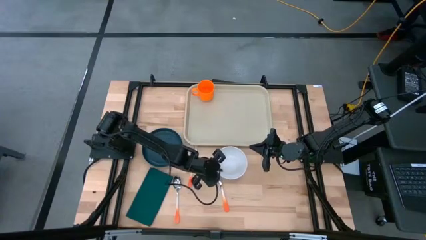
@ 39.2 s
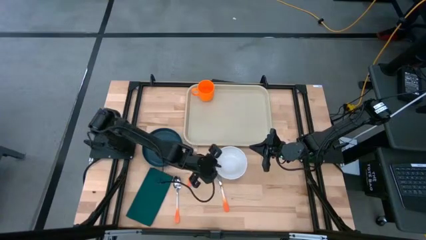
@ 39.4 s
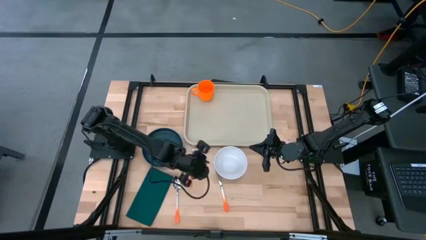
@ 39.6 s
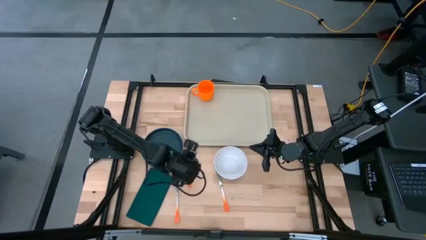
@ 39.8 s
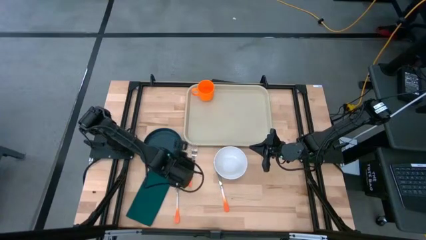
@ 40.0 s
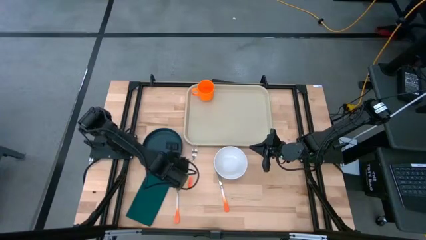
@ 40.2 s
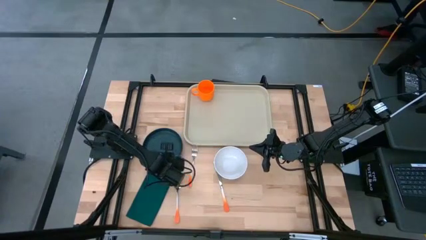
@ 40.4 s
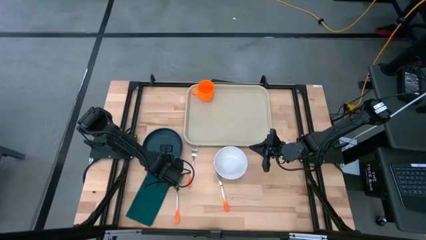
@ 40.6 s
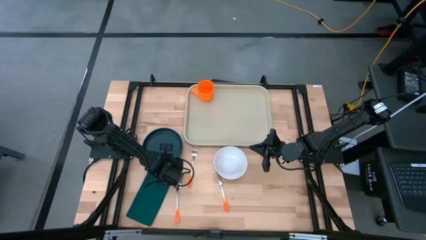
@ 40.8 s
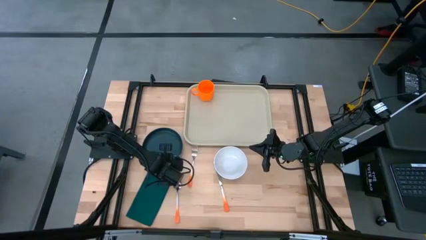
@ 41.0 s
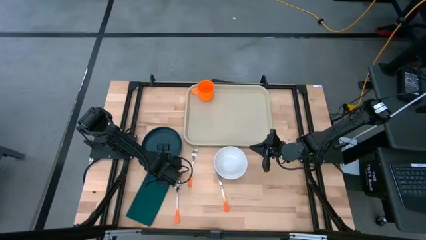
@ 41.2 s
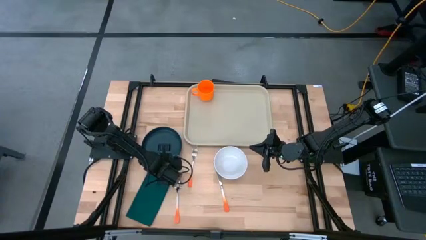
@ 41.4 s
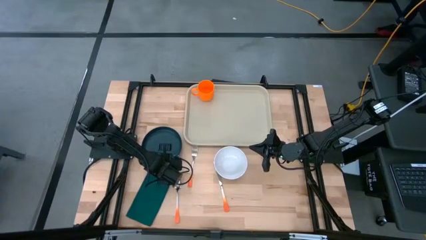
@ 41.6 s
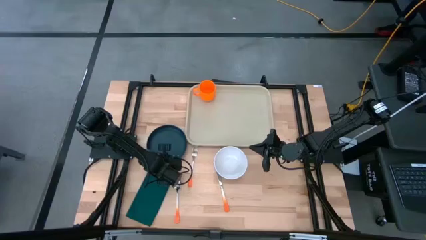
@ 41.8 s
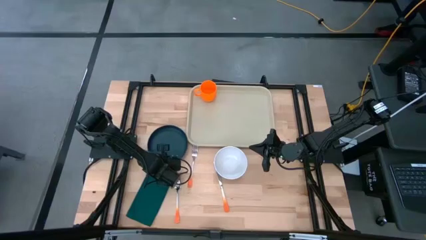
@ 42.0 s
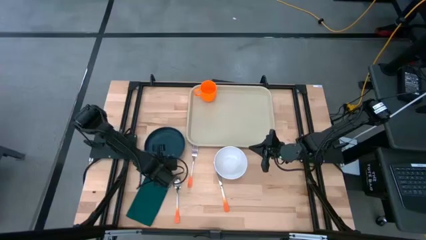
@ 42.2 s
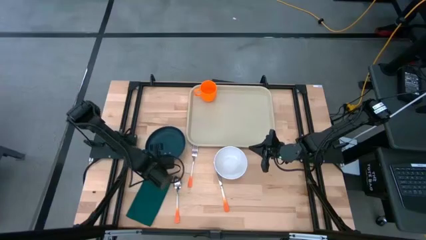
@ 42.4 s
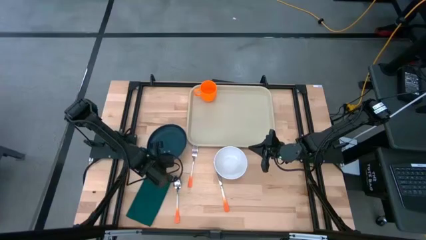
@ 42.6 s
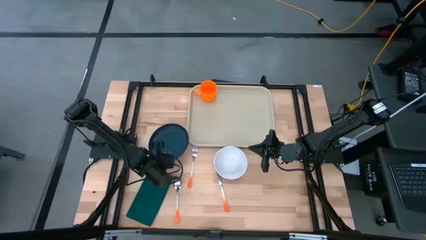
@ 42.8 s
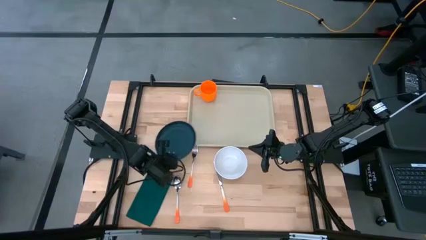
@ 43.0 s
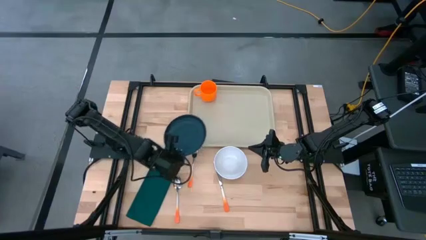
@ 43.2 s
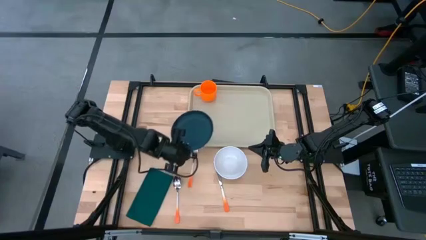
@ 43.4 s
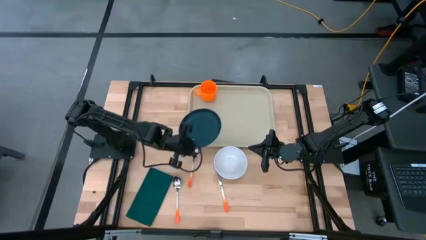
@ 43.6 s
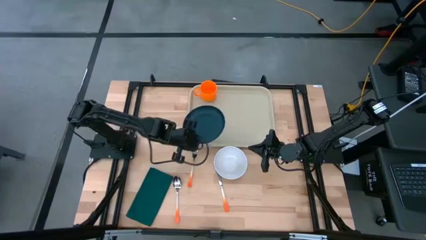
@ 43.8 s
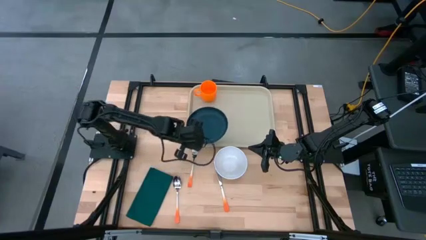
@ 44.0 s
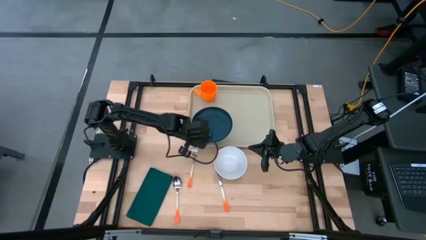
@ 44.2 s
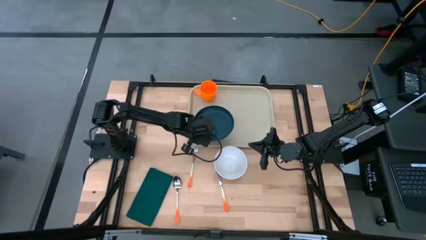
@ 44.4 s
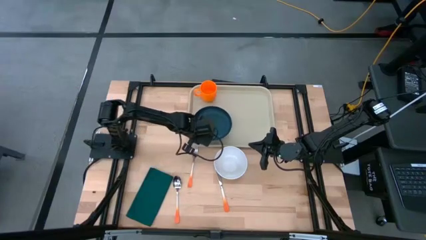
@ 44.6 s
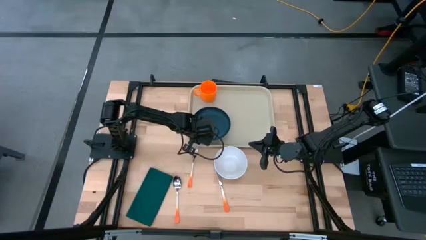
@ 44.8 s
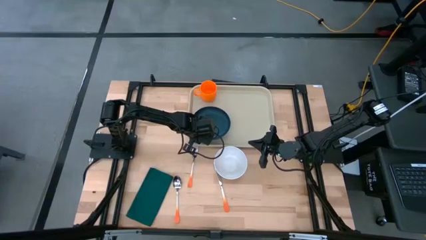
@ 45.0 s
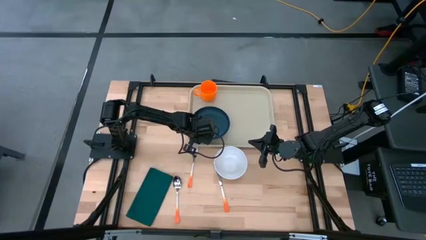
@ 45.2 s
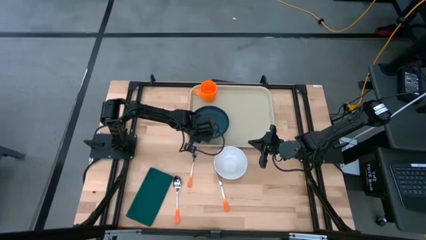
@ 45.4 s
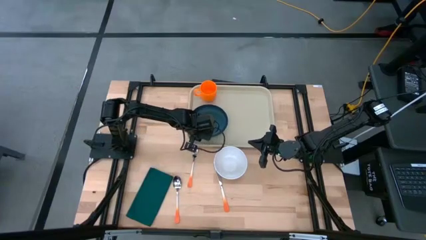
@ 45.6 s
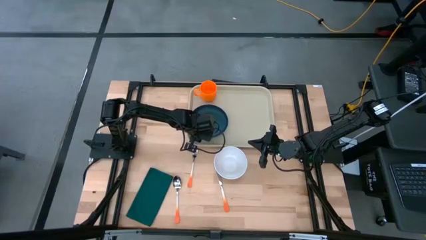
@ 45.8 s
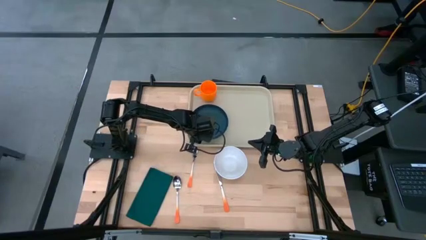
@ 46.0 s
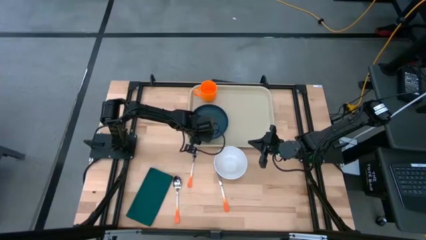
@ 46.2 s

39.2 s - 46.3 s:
Task: Set up tray
Put the blue plate below the orange mug on the gray serving tray

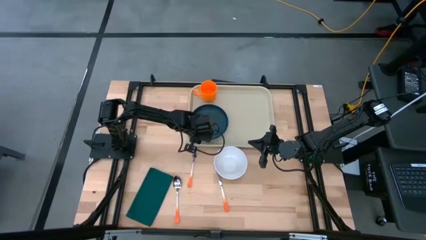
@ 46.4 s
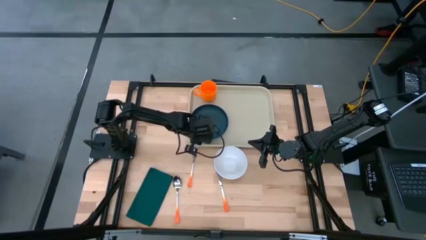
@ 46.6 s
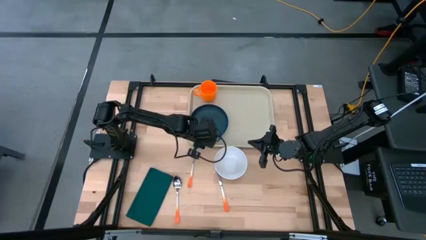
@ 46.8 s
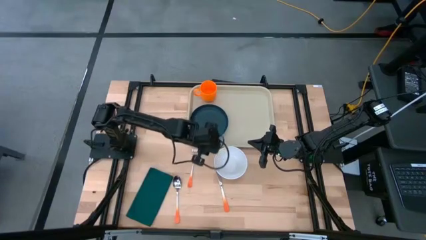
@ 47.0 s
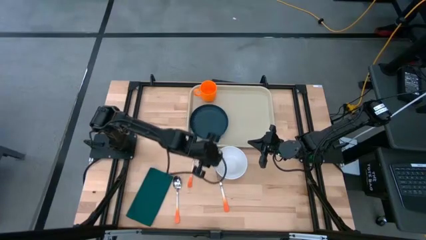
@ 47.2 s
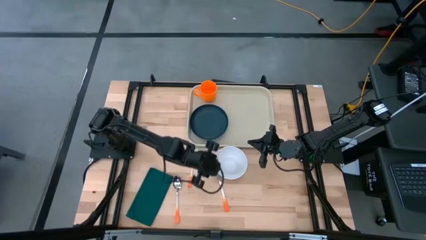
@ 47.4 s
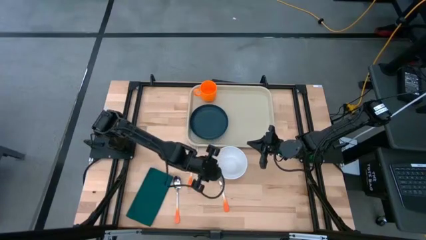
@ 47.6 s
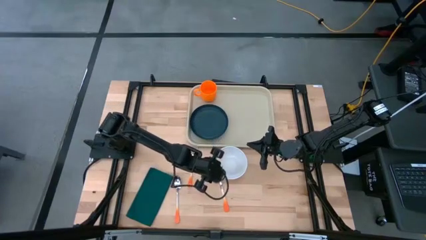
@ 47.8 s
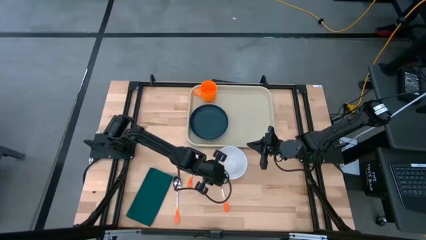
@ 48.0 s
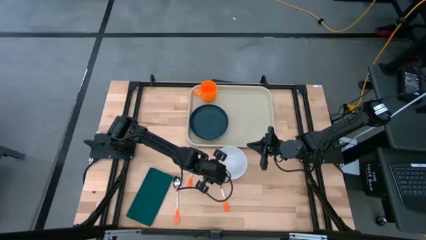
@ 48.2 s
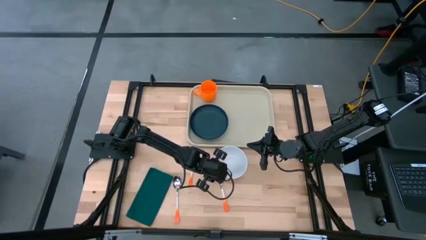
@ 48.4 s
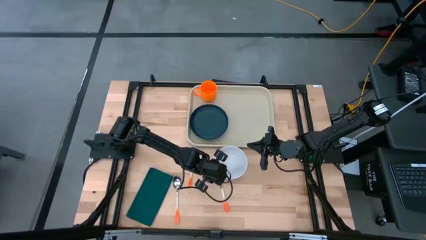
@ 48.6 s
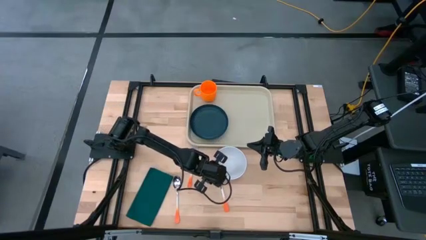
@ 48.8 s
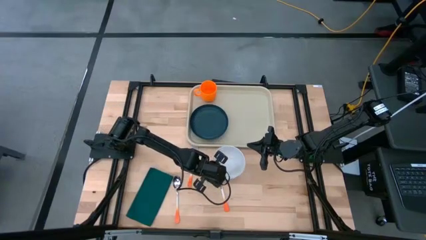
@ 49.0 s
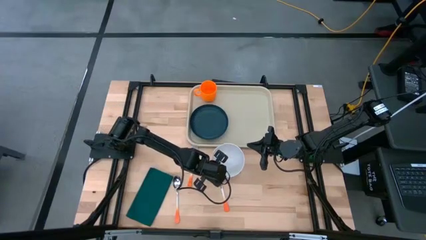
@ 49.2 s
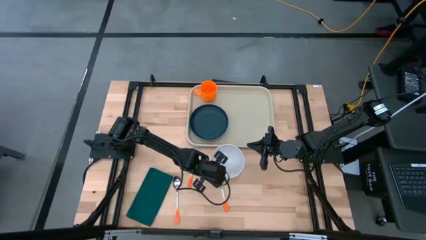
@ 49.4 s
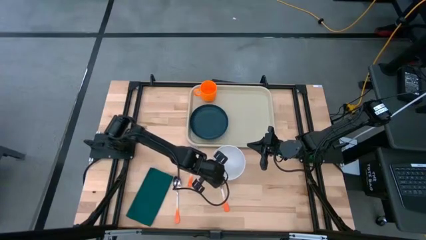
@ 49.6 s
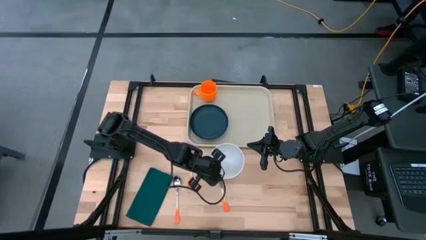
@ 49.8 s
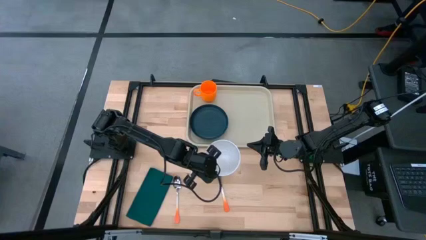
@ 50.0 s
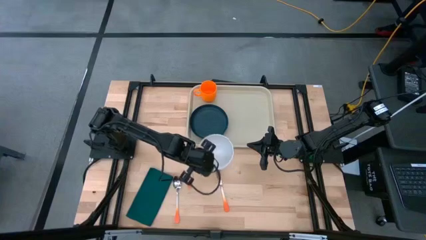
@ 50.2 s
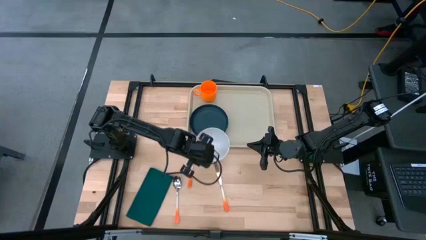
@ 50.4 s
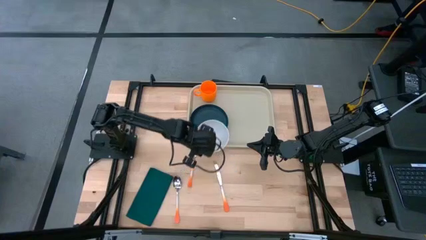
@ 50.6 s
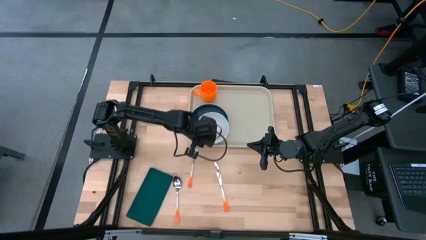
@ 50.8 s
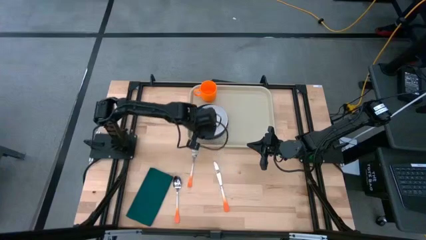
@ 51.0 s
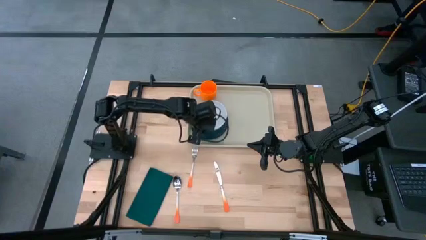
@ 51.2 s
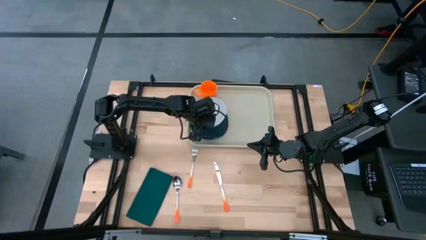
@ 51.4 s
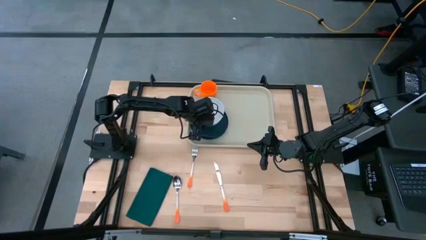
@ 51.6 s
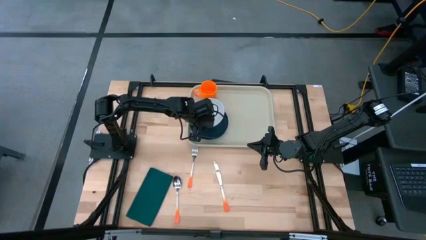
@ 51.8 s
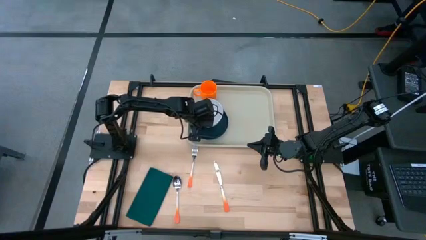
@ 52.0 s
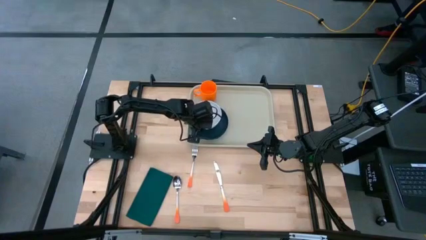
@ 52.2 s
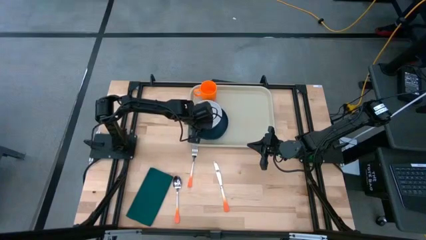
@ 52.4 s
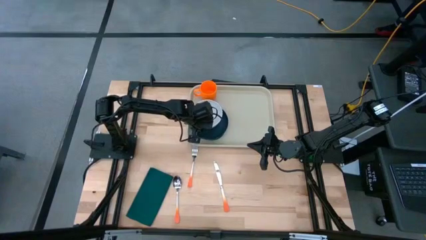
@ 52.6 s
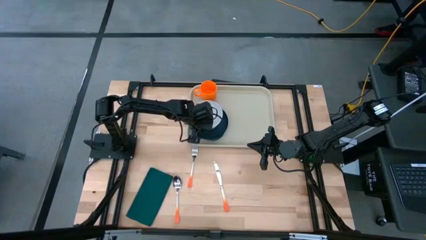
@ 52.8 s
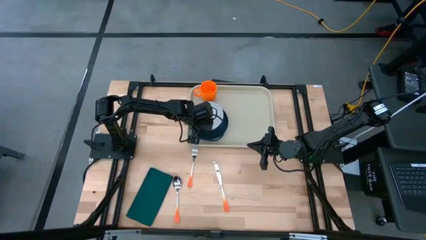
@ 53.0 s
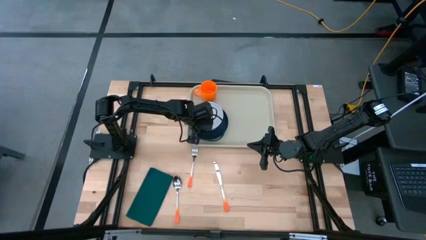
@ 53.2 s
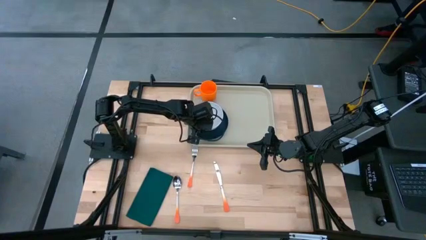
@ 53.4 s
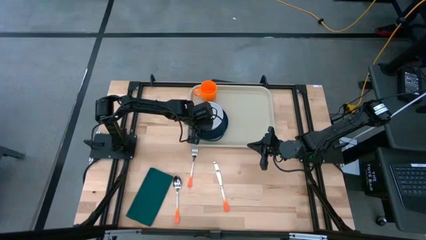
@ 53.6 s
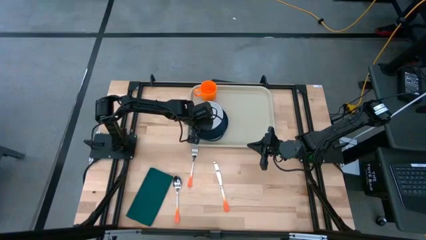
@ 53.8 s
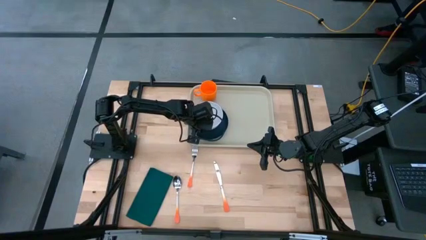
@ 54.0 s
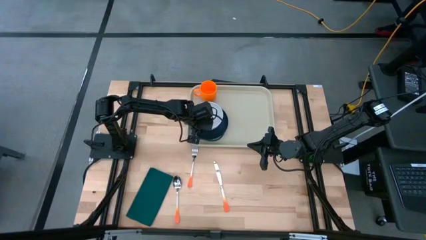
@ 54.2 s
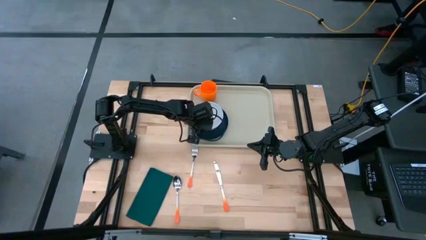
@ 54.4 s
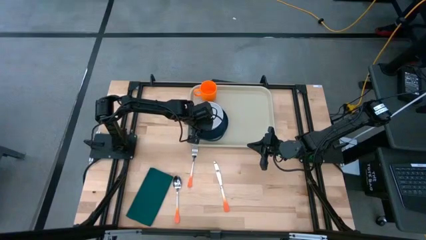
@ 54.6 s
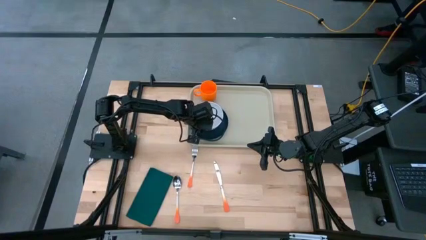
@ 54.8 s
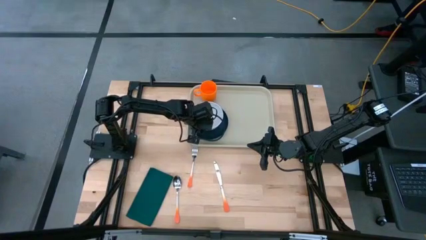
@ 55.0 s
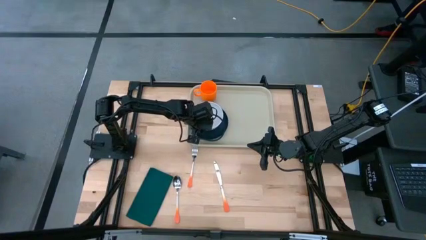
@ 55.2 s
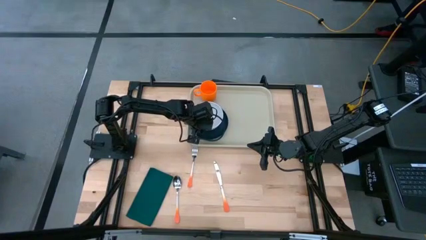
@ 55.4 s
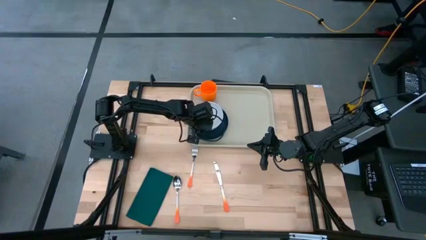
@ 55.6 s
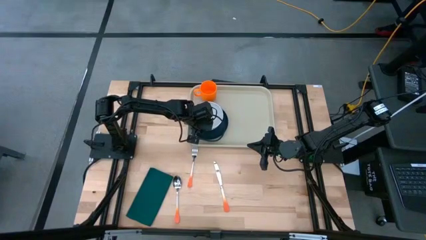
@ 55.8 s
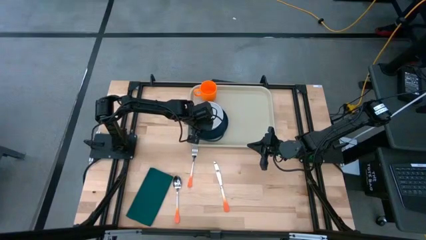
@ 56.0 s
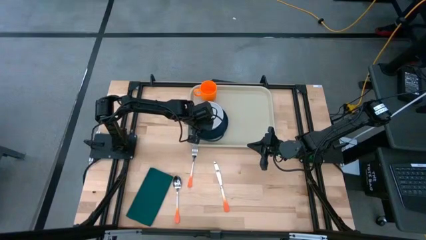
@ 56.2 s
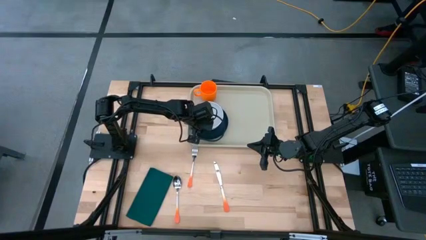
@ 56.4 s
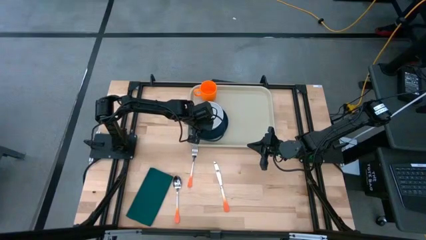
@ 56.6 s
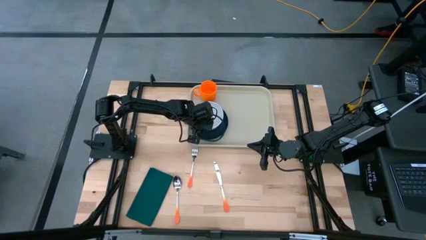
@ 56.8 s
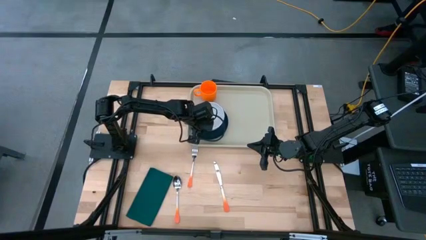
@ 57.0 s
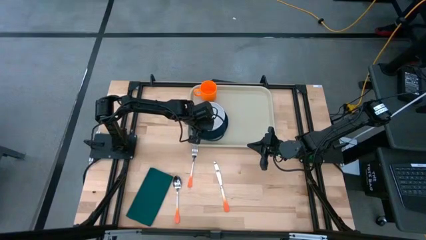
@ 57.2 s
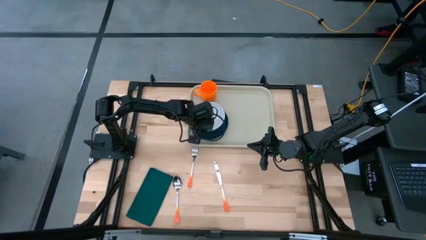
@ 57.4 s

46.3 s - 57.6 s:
Put the white bowl on top of the blue plate on the gray serving tray
